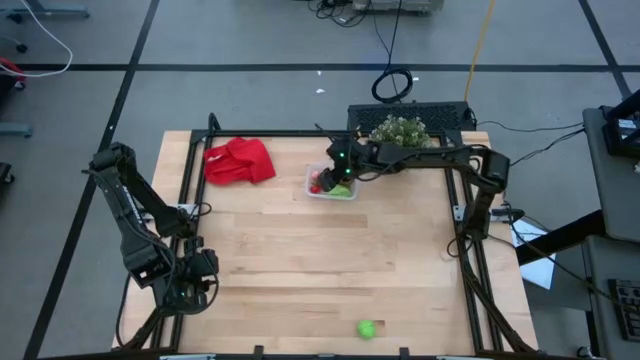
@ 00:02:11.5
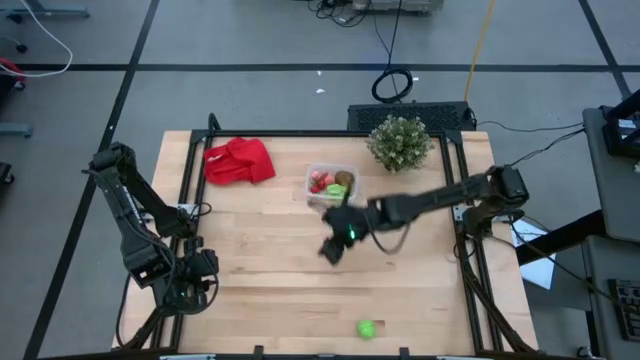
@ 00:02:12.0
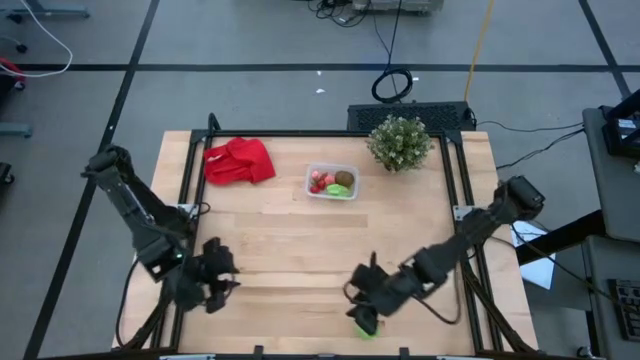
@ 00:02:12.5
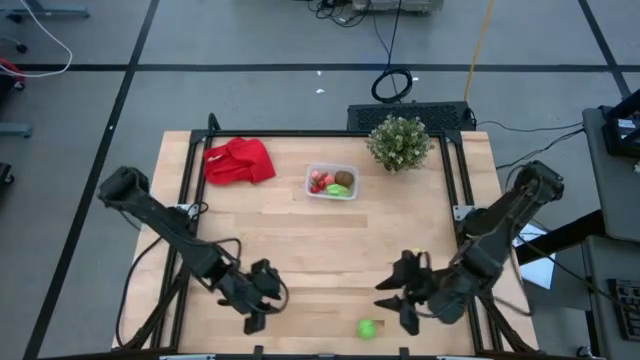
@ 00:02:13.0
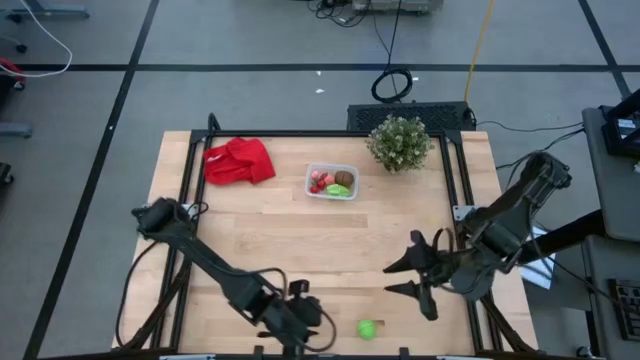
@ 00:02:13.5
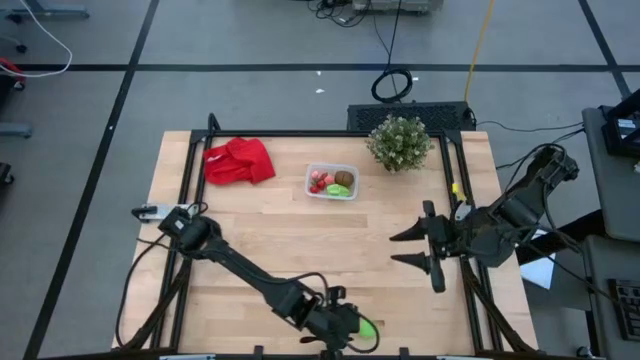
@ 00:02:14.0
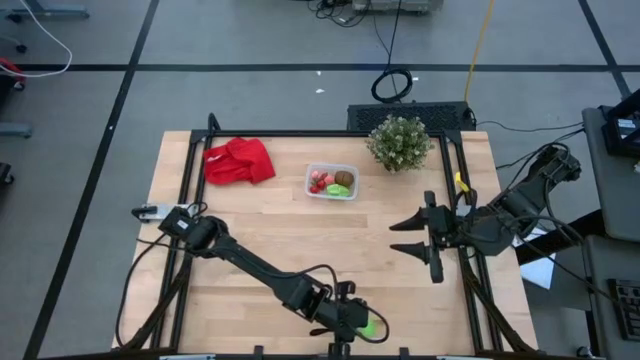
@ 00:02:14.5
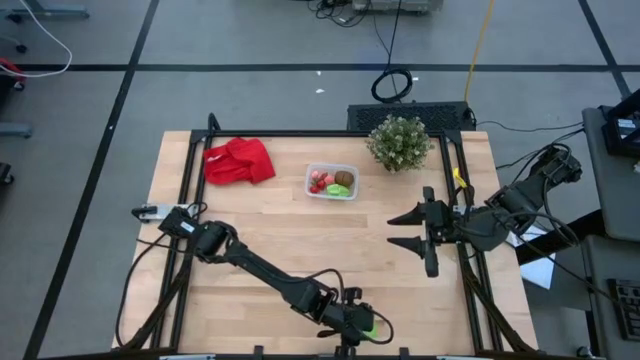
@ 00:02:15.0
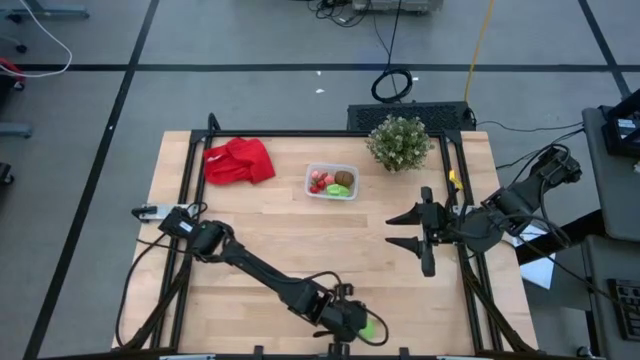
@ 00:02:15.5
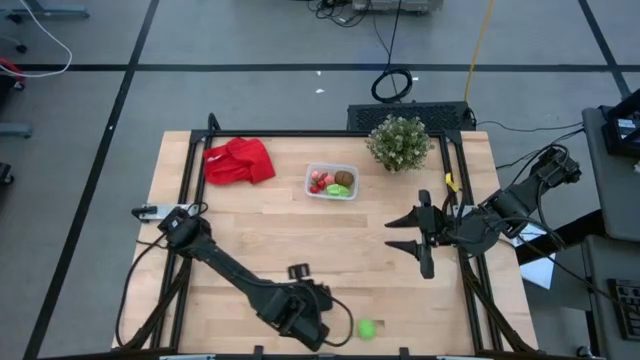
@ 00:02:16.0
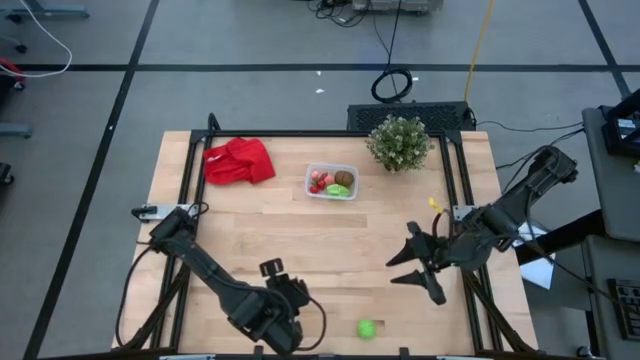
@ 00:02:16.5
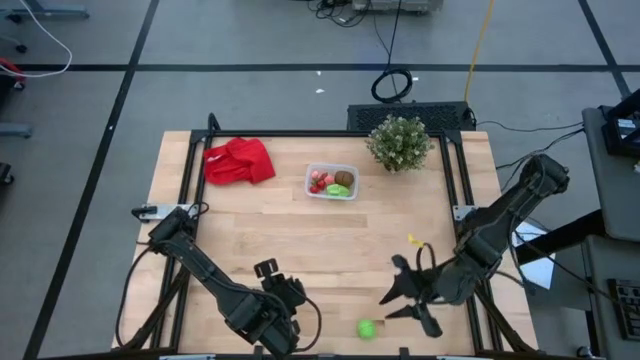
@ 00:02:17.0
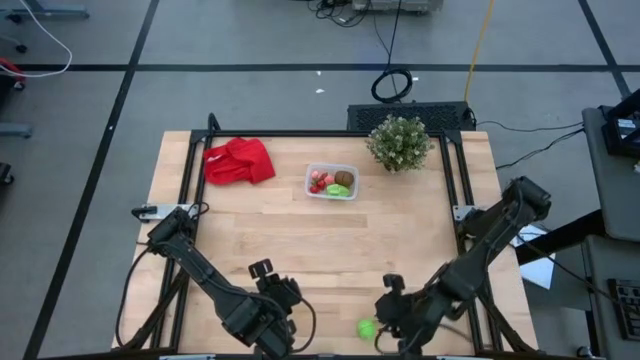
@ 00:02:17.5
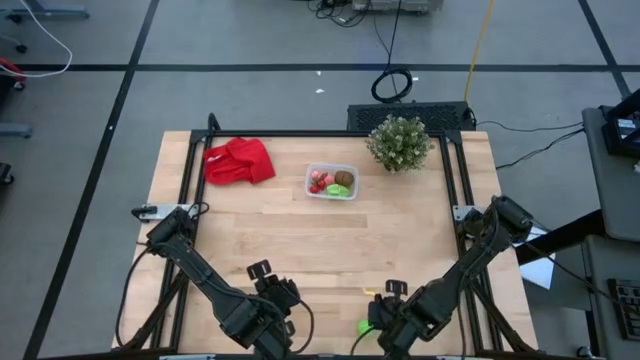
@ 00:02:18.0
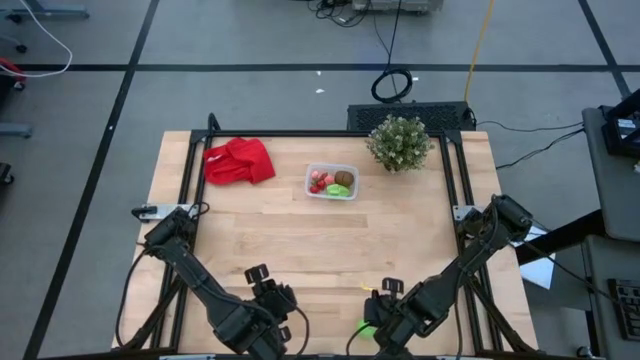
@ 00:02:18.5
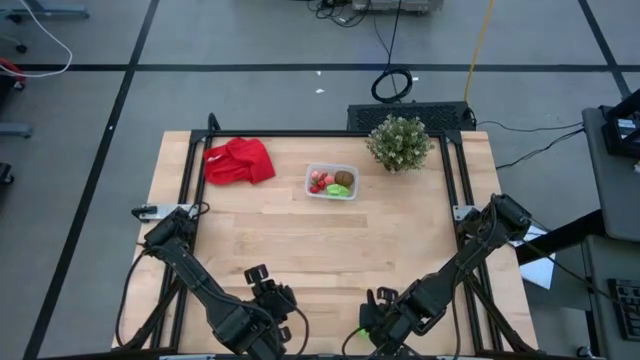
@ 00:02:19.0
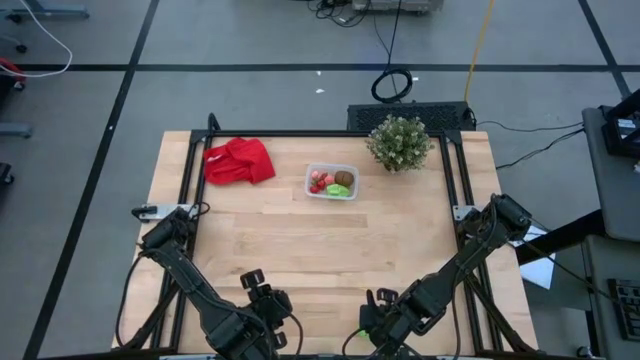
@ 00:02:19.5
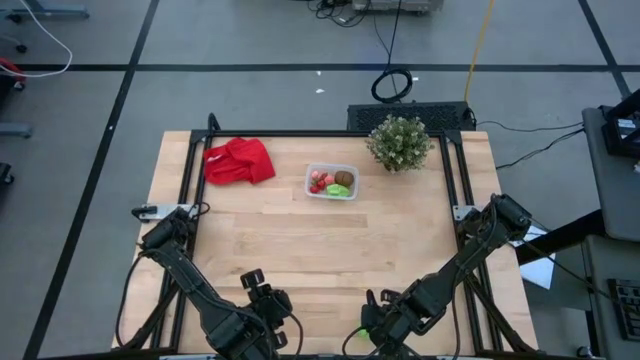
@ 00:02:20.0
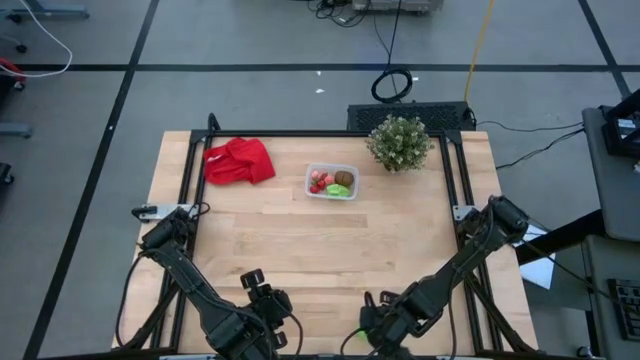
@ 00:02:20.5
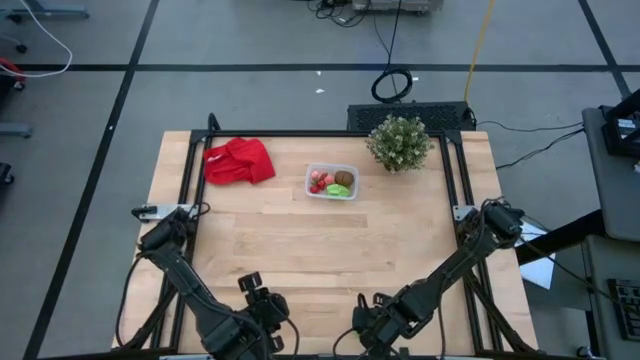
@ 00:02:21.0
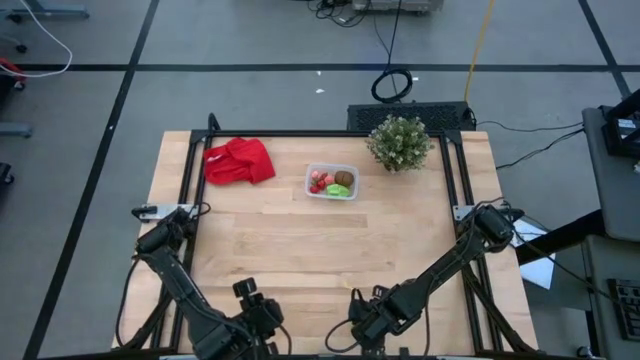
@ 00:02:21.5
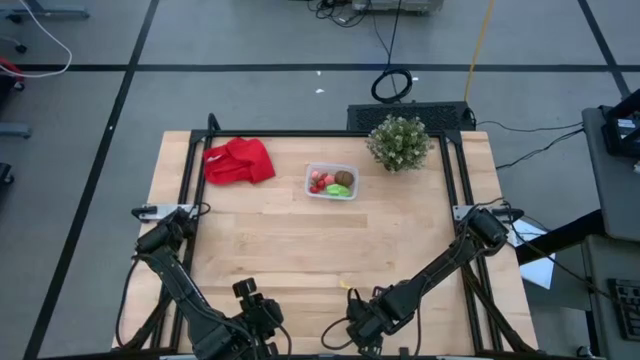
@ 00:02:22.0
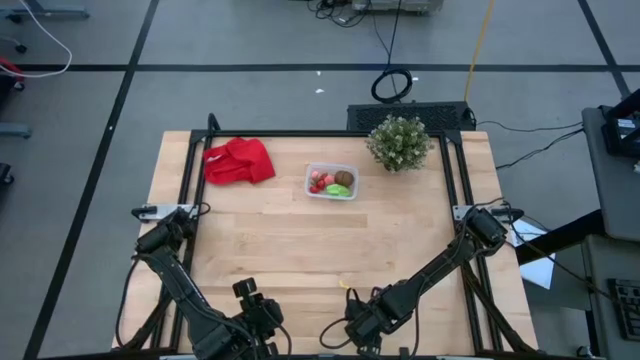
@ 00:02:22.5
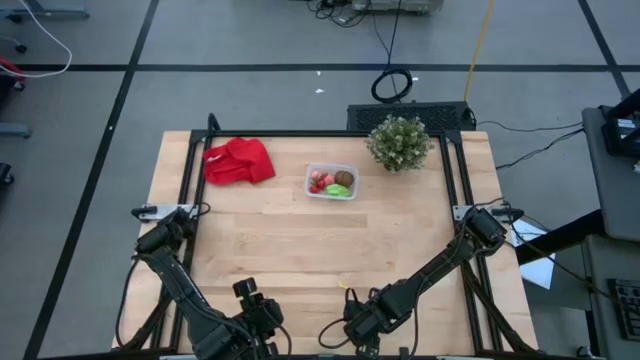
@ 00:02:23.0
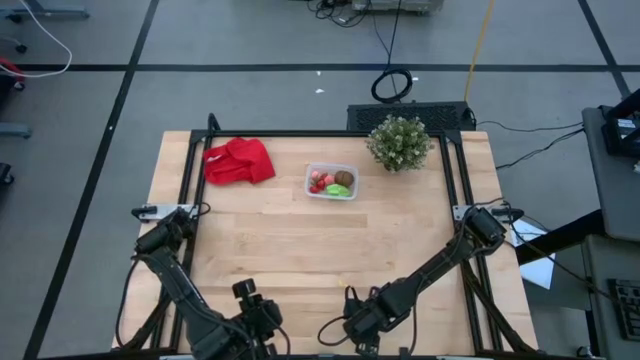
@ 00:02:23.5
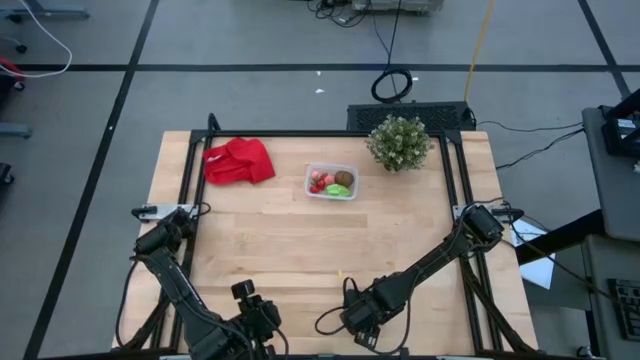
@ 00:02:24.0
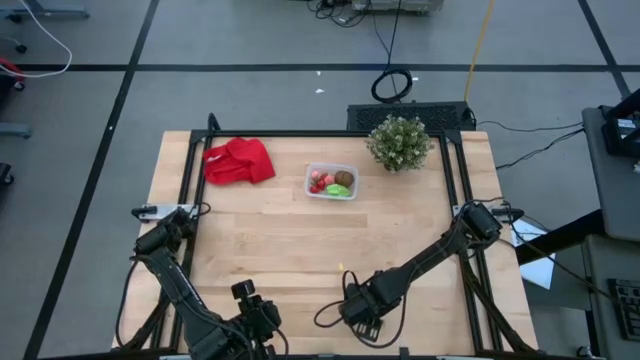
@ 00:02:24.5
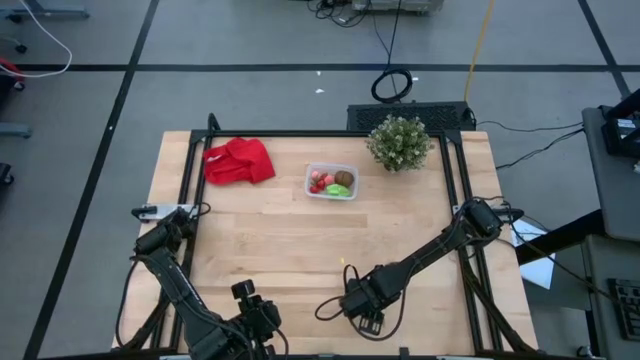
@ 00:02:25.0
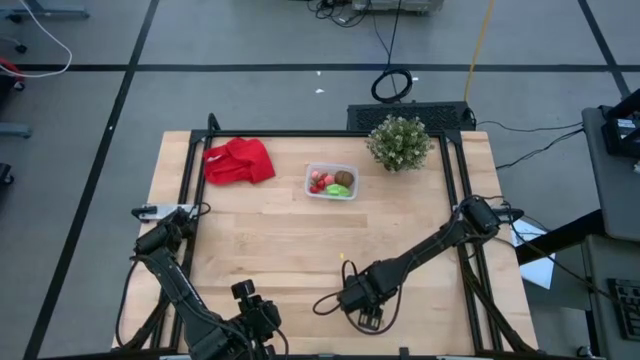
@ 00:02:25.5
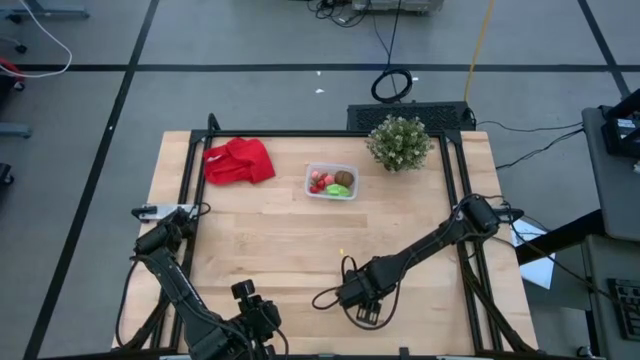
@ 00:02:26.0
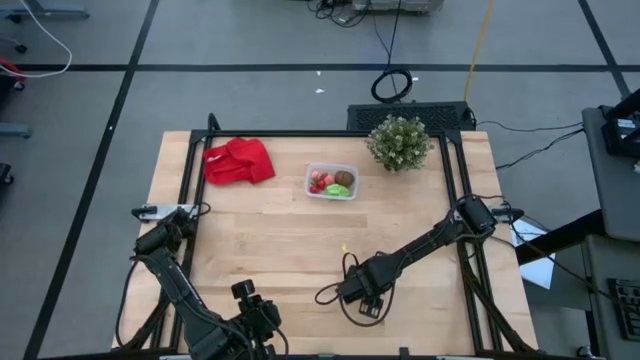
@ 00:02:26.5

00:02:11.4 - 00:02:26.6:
Task: Pick and placing Produce into tupperware
Put the cabbage into the bin

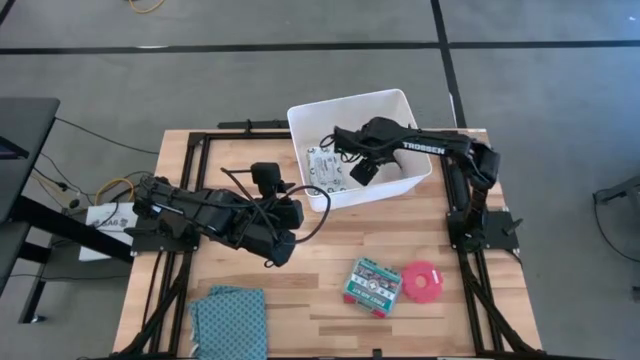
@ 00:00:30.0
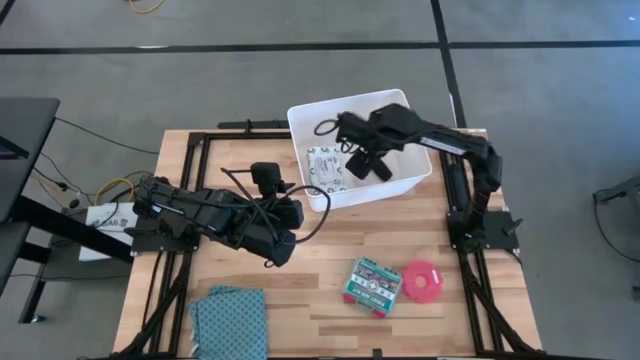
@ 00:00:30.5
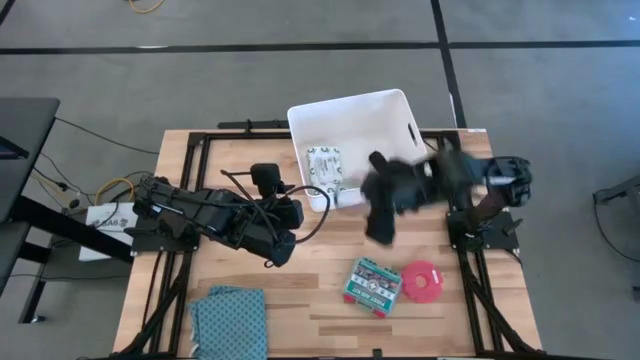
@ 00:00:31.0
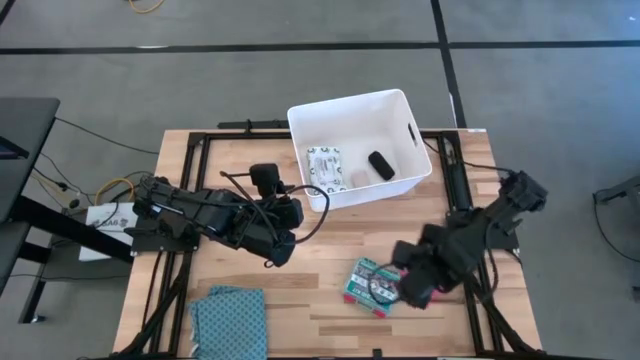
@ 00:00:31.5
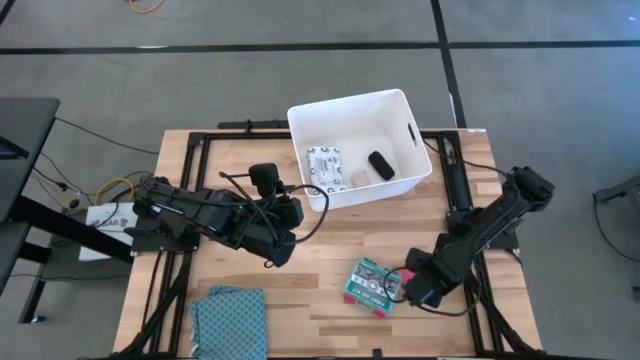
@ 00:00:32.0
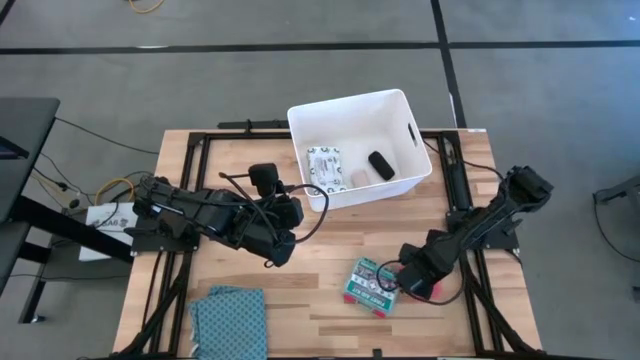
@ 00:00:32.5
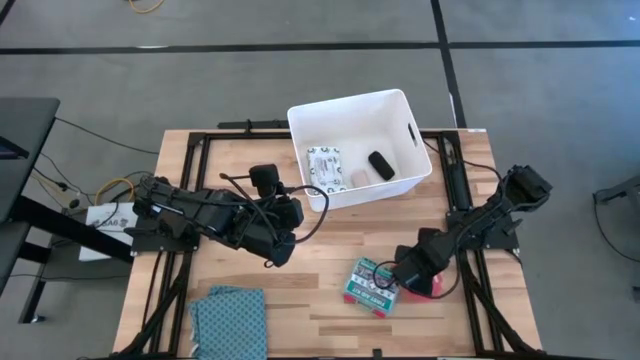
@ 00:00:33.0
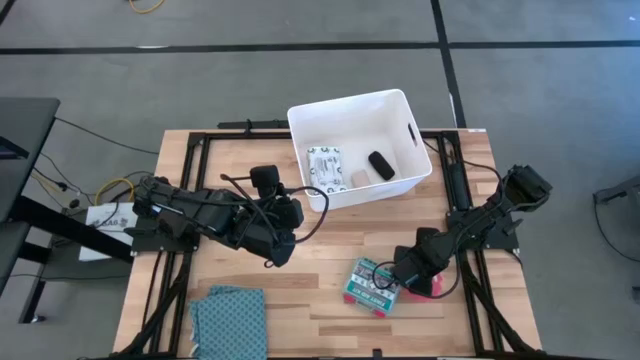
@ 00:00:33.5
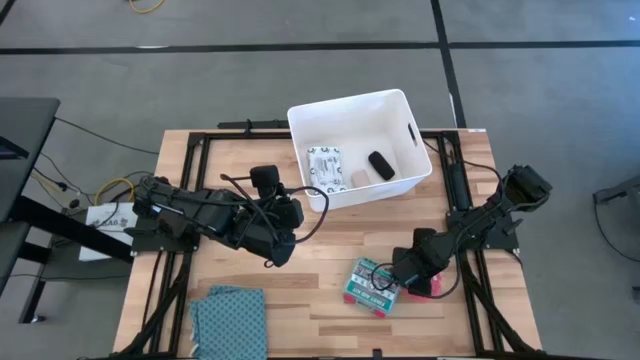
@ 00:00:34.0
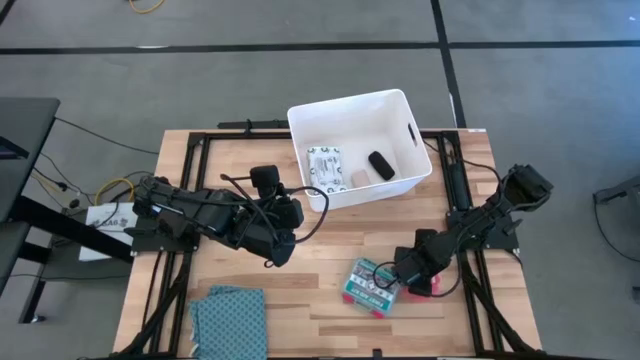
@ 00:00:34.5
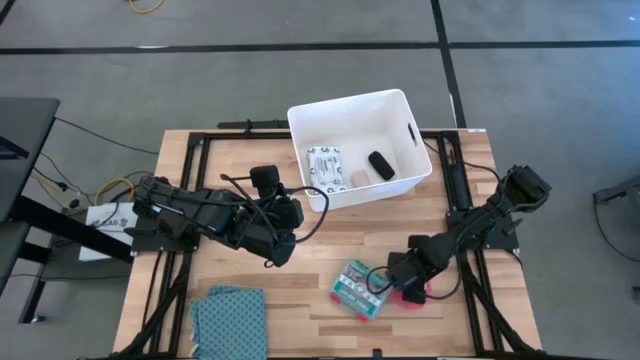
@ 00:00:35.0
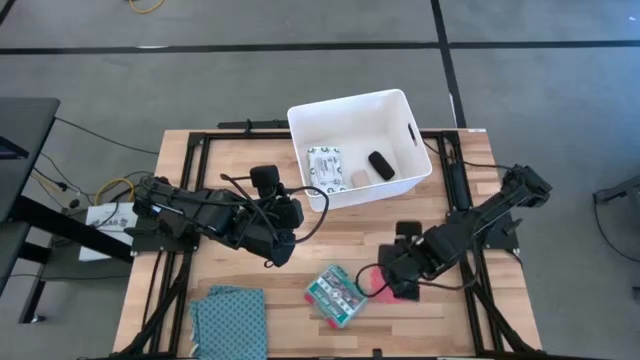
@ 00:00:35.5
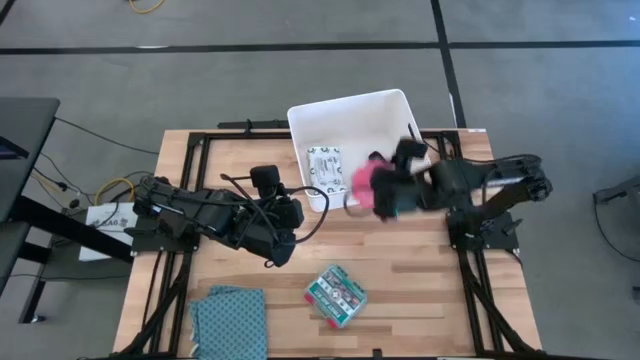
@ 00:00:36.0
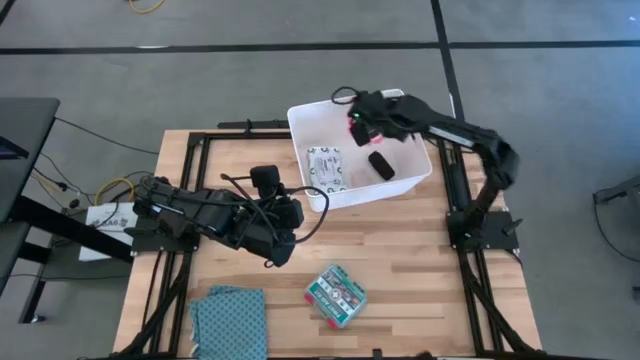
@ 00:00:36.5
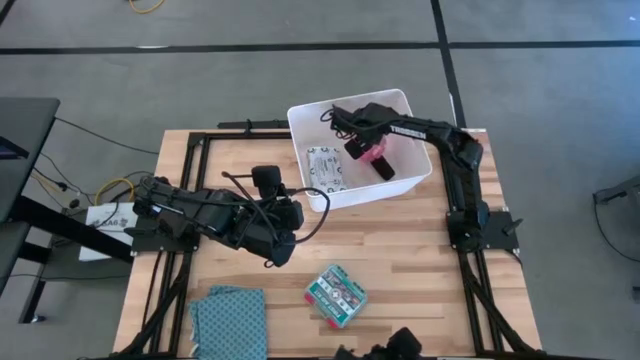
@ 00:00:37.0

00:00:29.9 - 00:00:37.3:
Task: Pick & place medical supplies in basket/bin
Put the red pill organizer into the white bin
